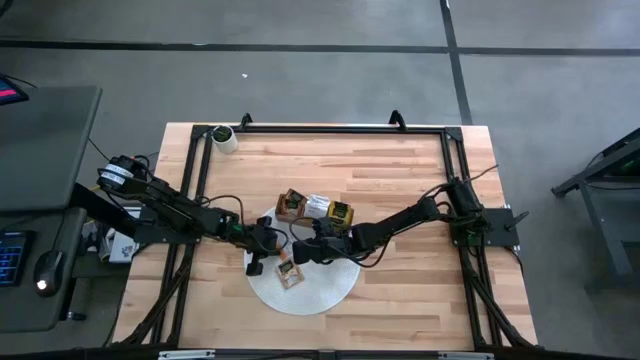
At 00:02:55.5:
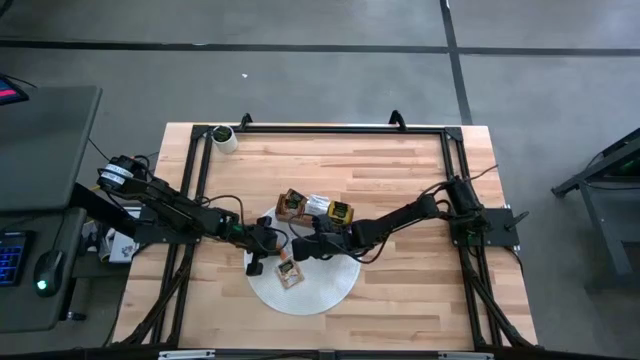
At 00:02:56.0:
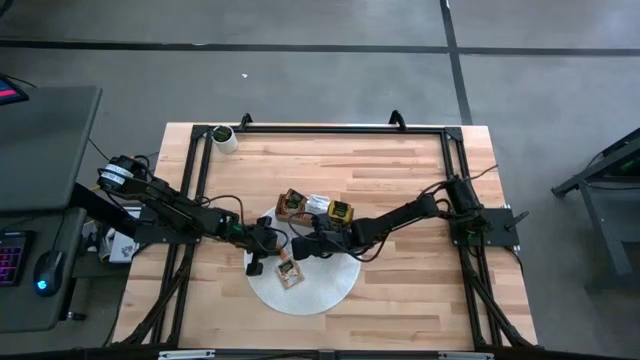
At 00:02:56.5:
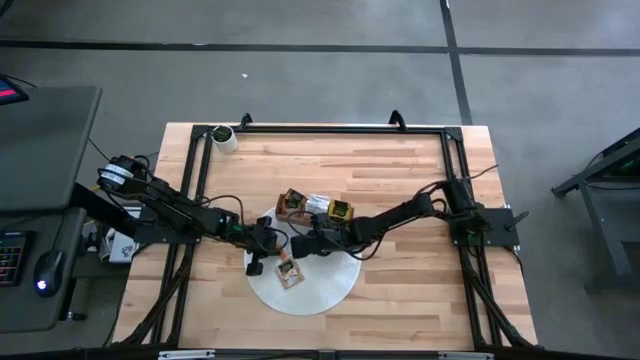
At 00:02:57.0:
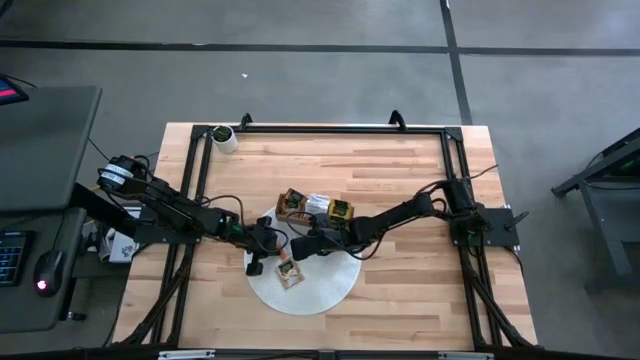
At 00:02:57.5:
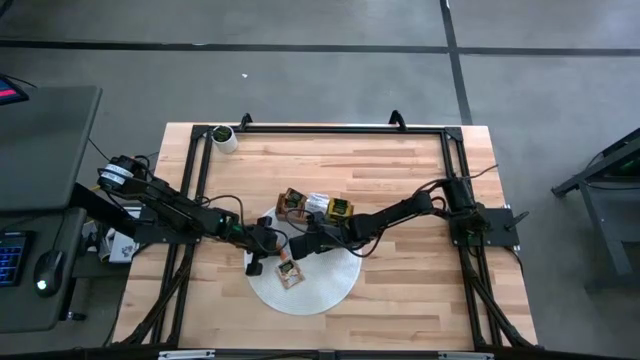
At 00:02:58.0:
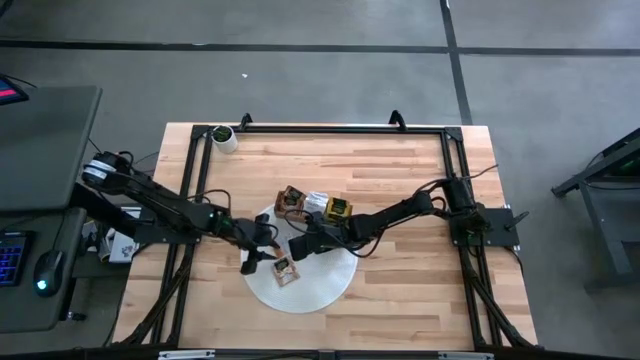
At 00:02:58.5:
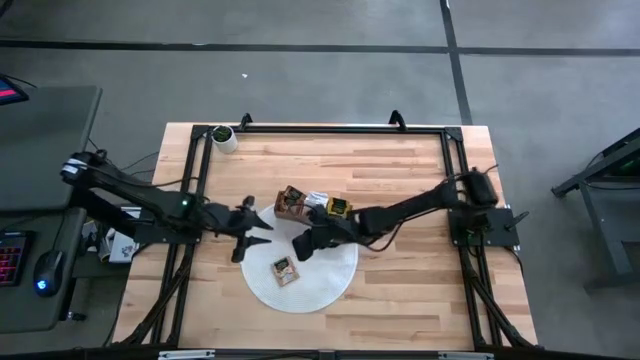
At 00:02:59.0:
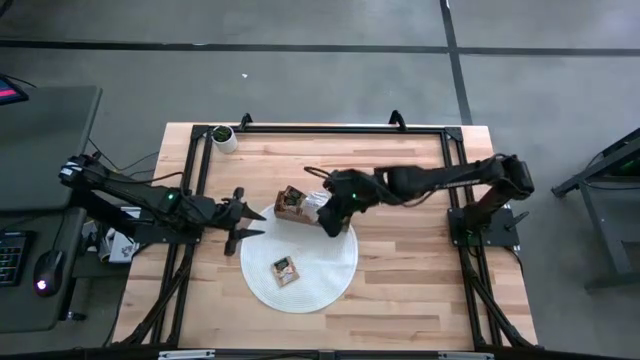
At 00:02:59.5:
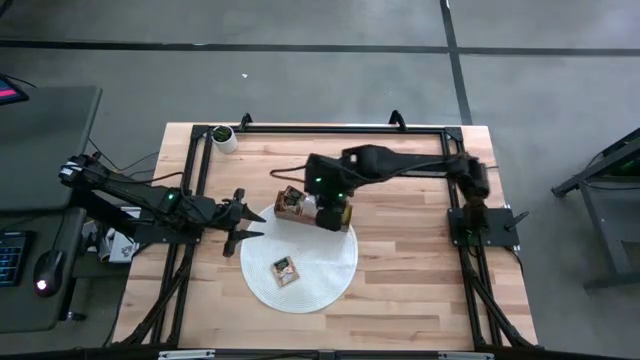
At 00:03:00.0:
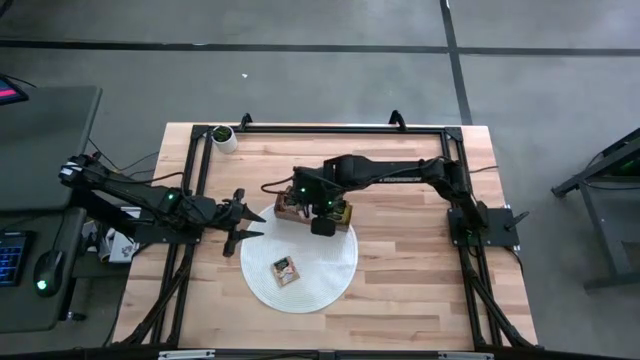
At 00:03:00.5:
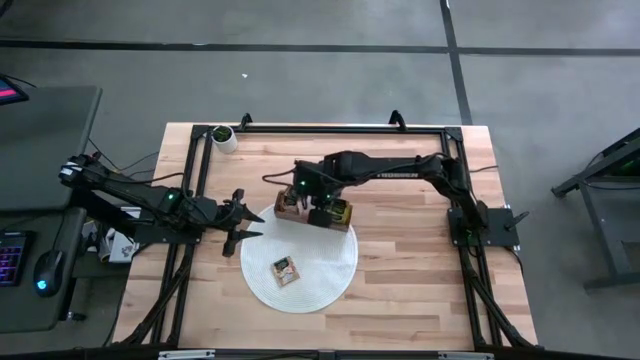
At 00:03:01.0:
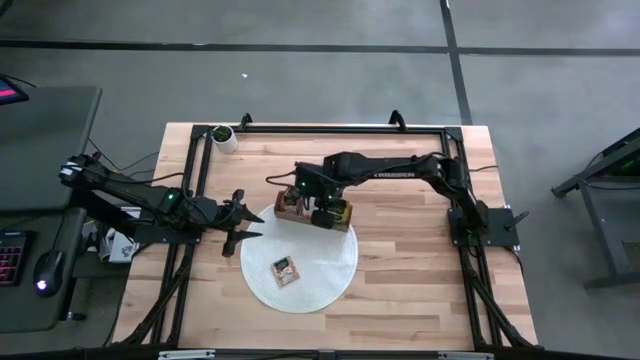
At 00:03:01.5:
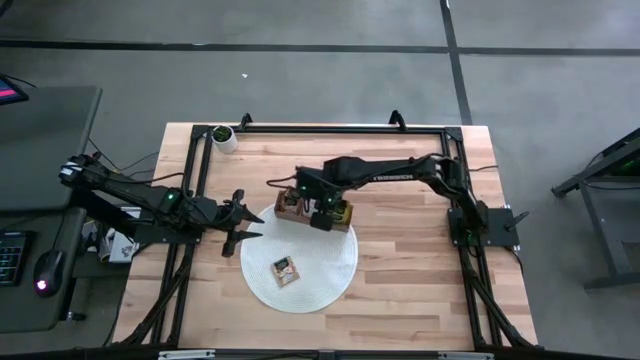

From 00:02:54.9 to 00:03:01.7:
Task: Pick & Place Tea
Put the orange tea bag into the middle section of the wooden organizer

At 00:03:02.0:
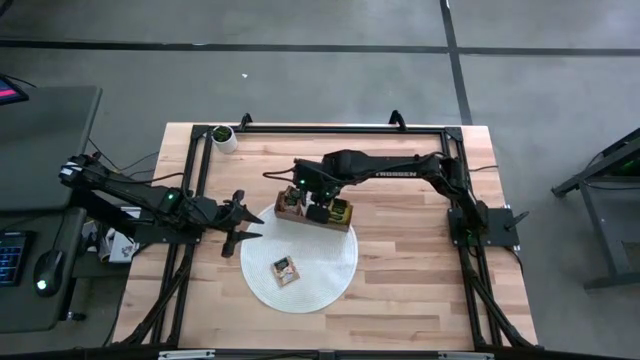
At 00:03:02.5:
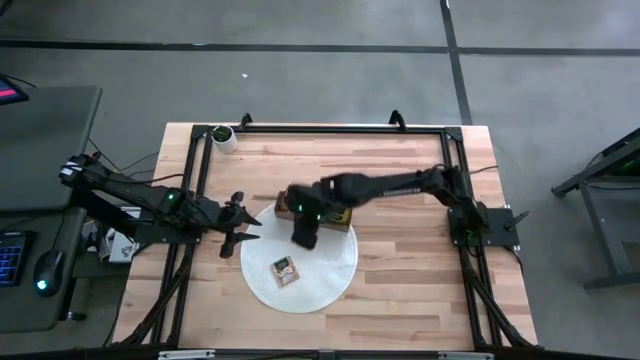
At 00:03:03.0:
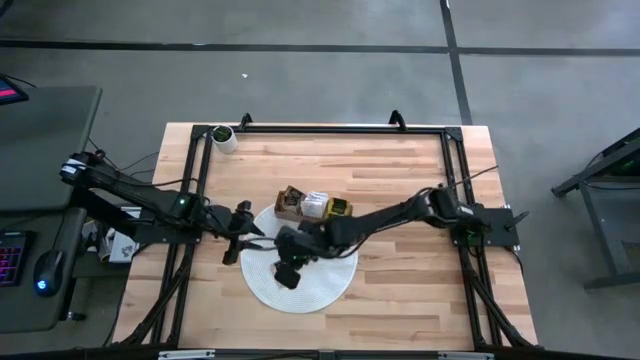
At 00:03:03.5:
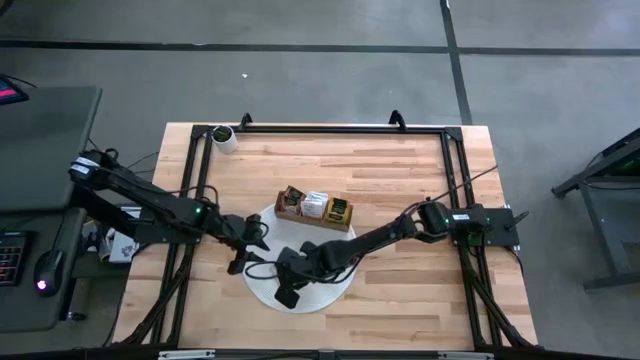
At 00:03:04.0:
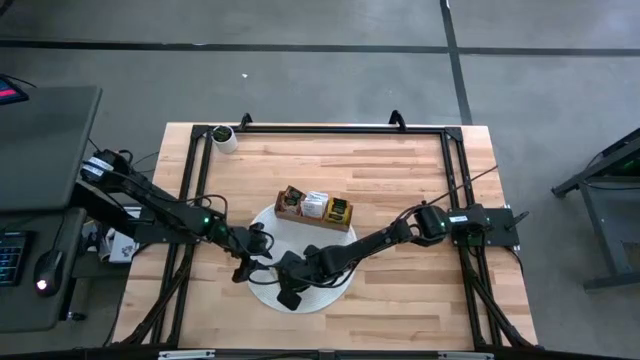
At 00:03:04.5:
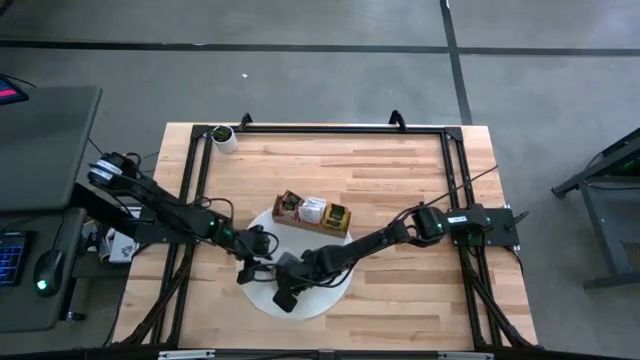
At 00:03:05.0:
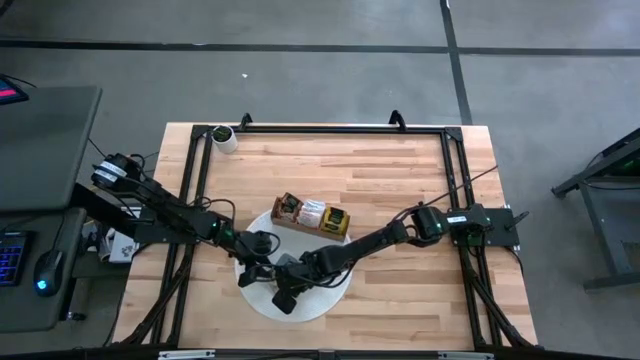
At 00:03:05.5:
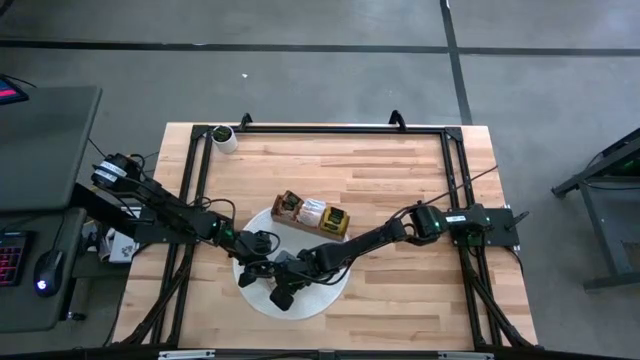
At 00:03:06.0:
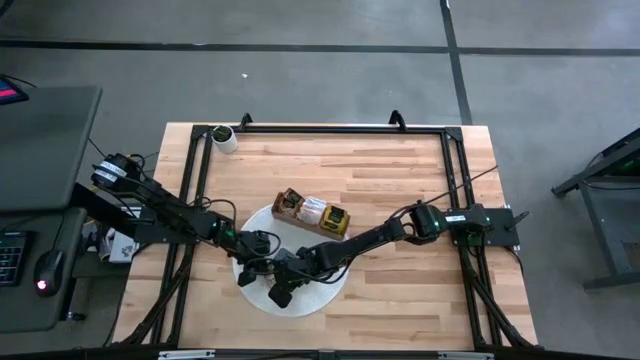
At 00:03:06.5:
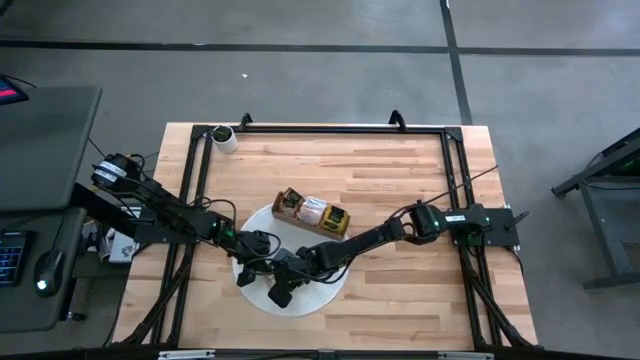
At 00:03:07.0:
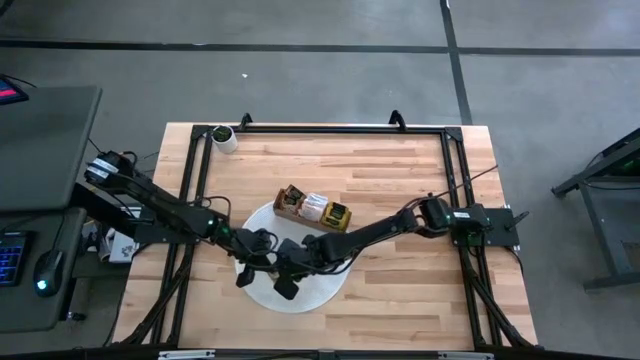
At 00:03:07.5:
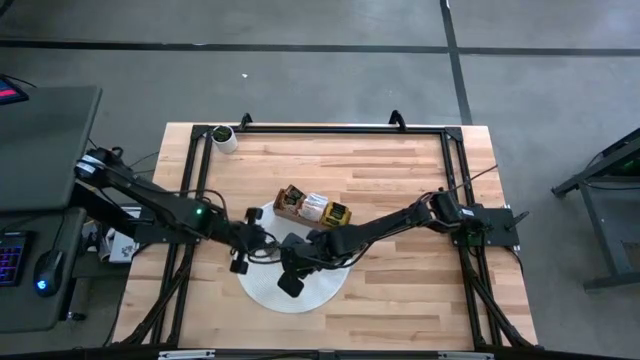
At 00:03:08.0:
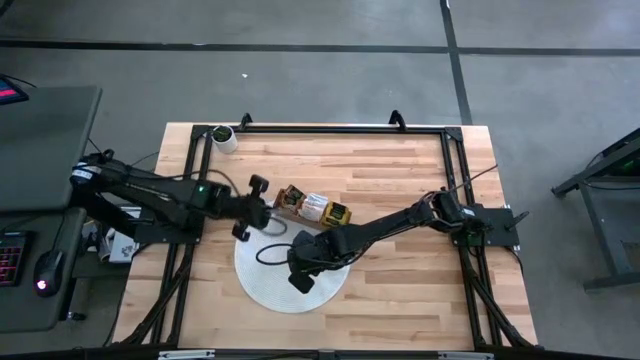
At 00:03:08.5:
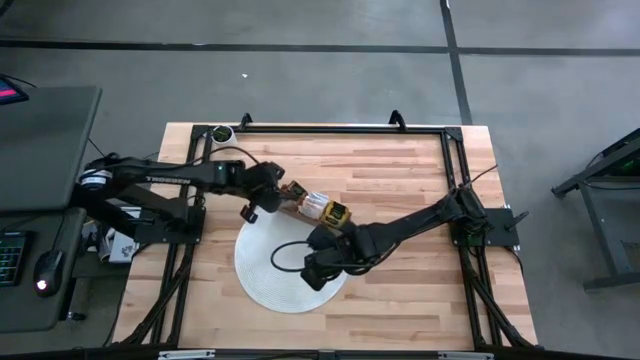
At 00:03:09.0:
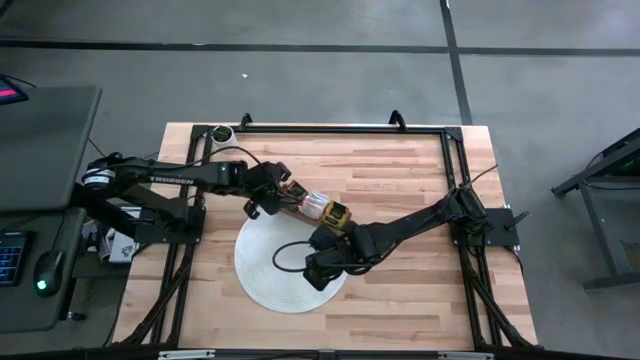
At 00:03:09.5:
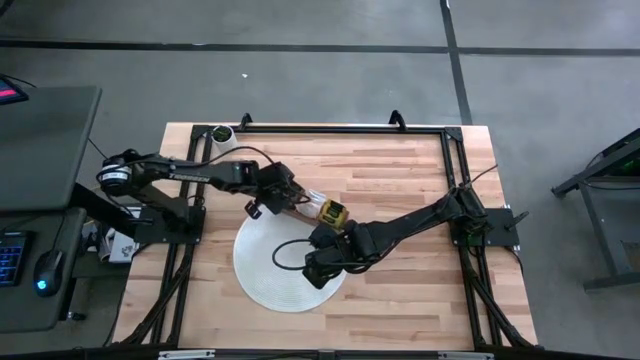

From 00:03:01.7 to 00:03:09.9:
Put the brown tea bag into the left section of the wooden organizer

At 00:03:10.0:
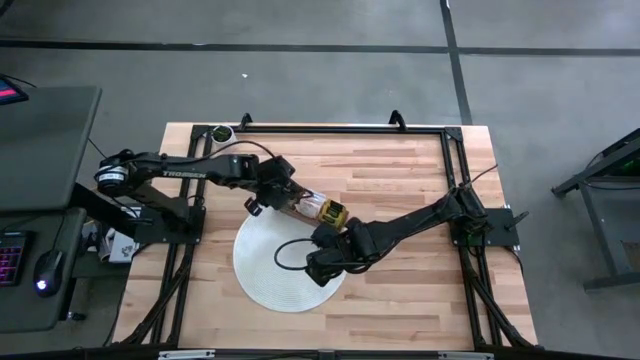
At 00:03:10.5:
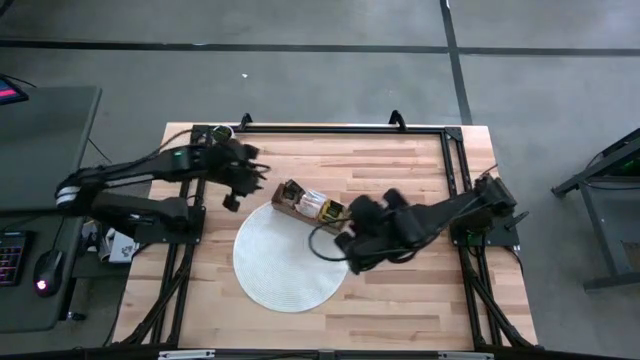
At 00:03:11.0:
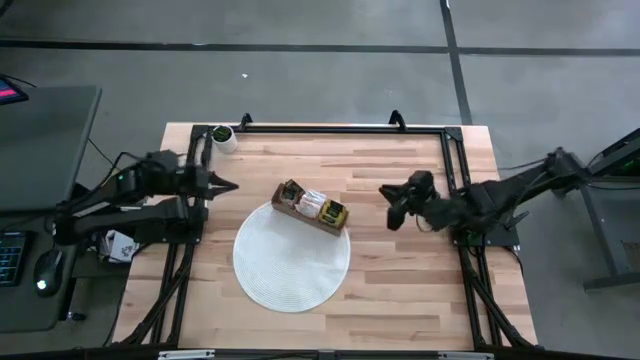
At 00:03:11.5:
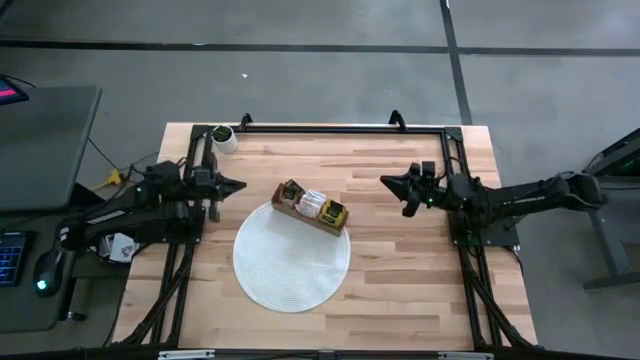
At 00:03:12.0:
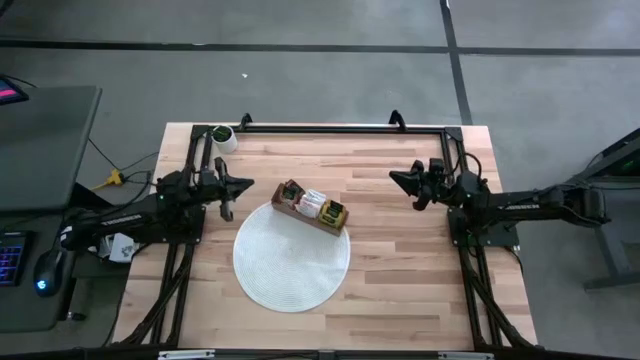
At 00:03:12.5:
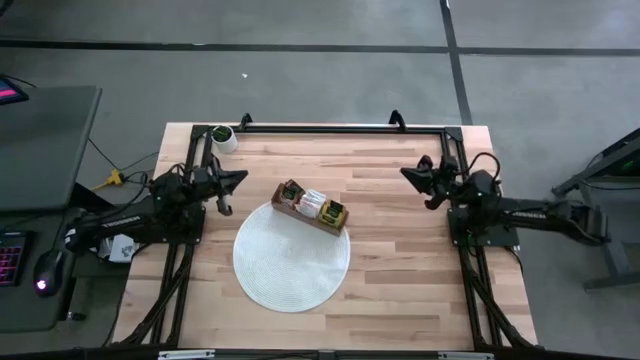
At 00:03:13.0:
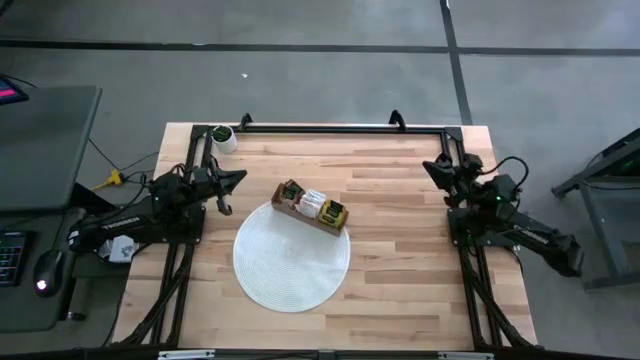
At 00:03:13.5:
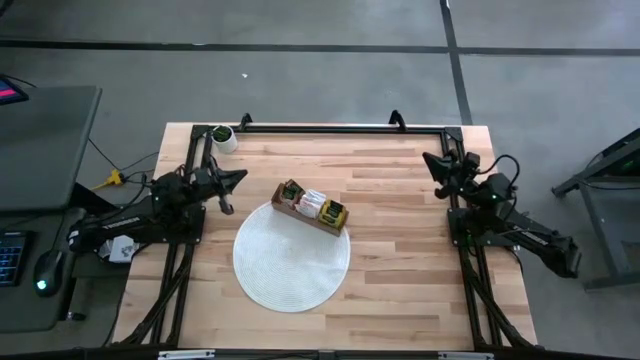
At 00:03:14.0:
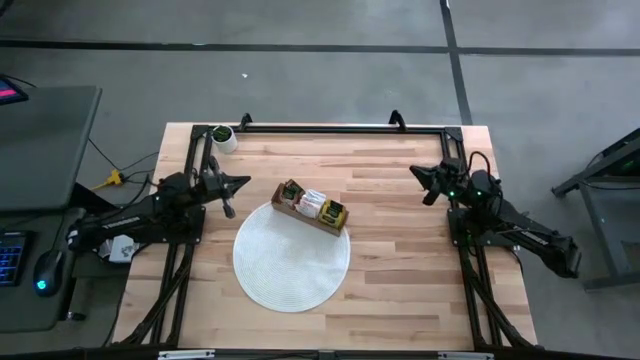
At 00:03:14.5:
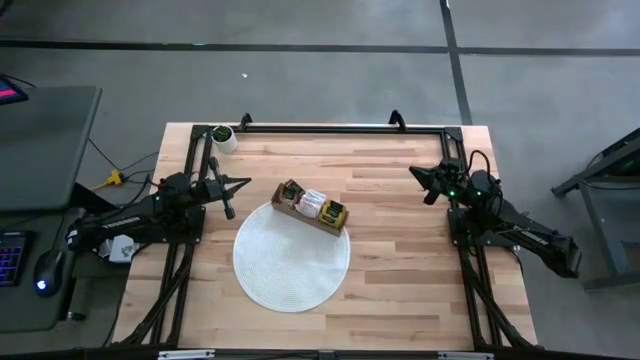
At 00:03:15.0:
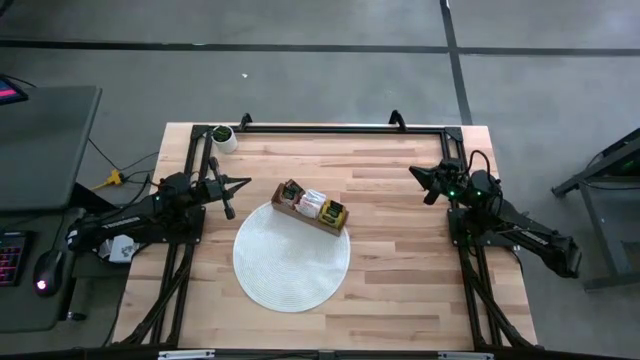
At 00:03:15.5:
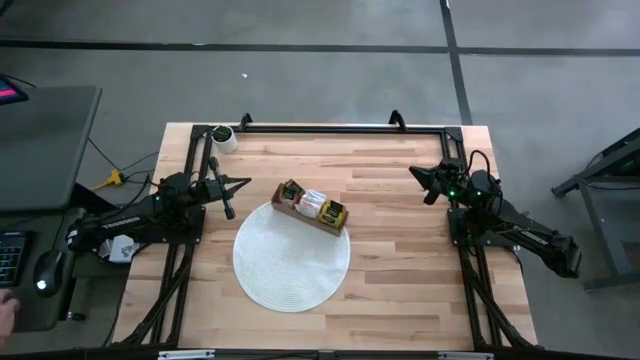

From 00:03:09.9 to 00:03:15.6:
Return to Home Position
